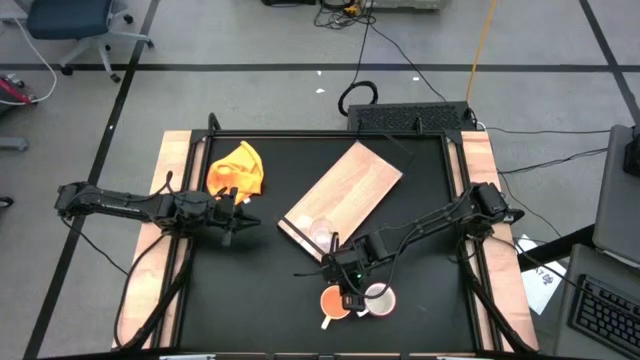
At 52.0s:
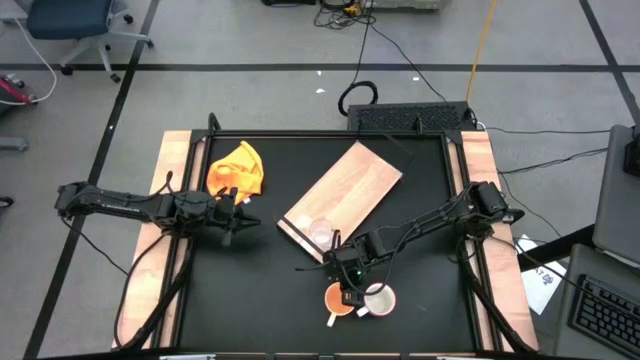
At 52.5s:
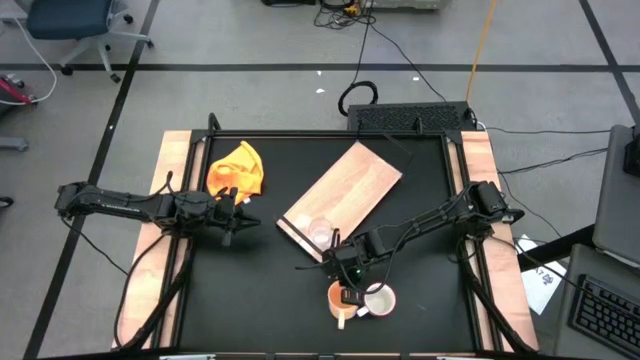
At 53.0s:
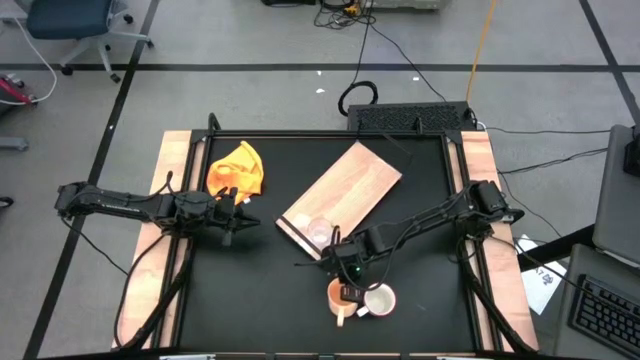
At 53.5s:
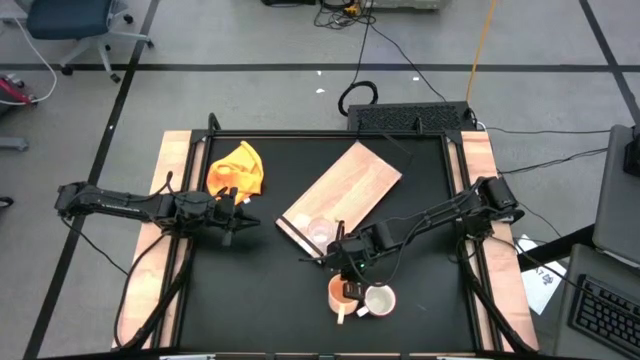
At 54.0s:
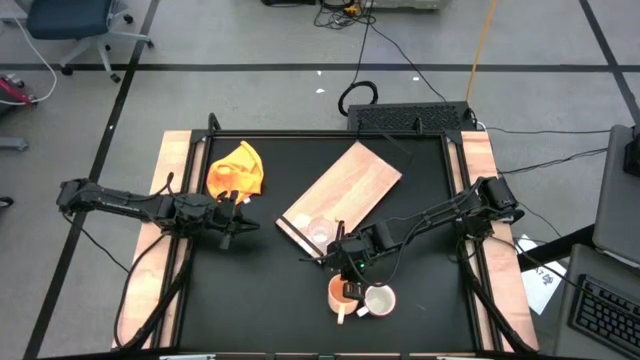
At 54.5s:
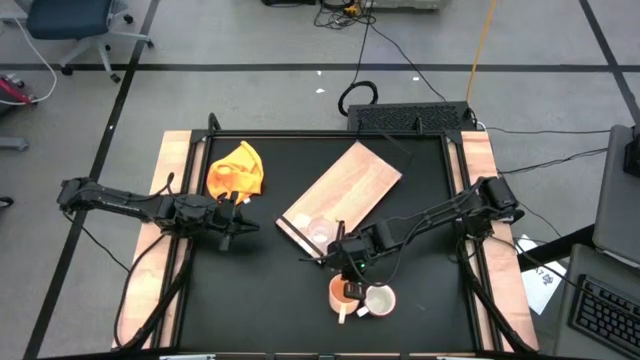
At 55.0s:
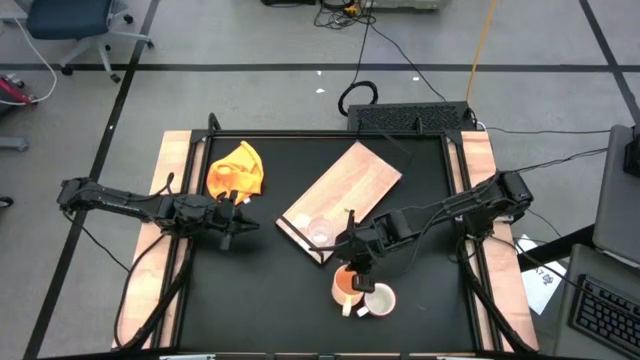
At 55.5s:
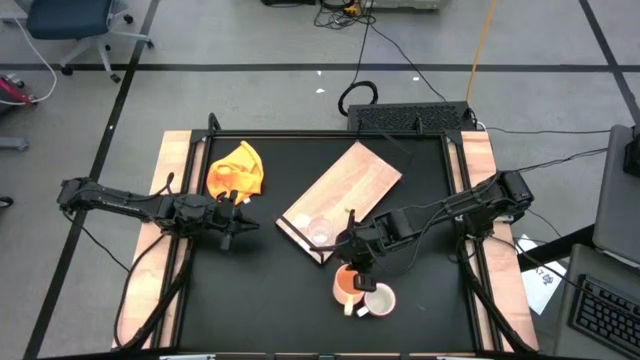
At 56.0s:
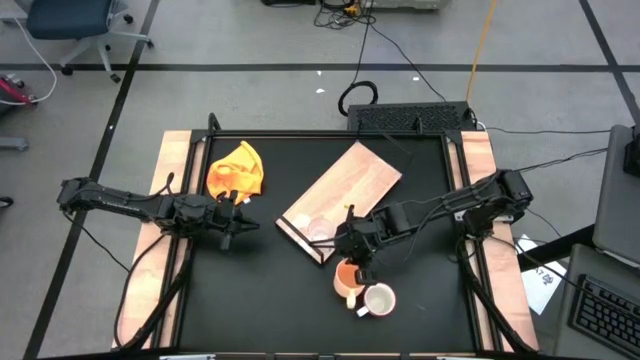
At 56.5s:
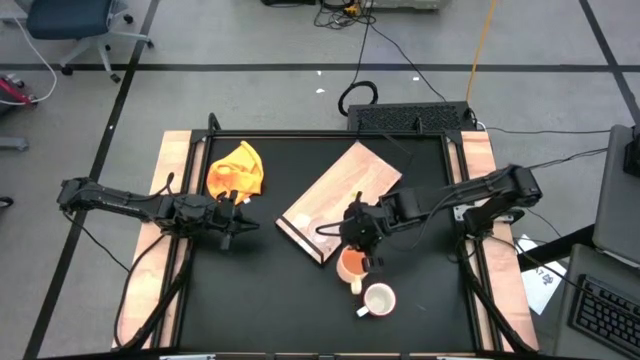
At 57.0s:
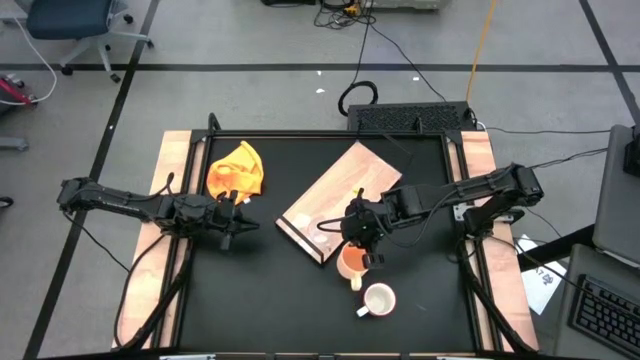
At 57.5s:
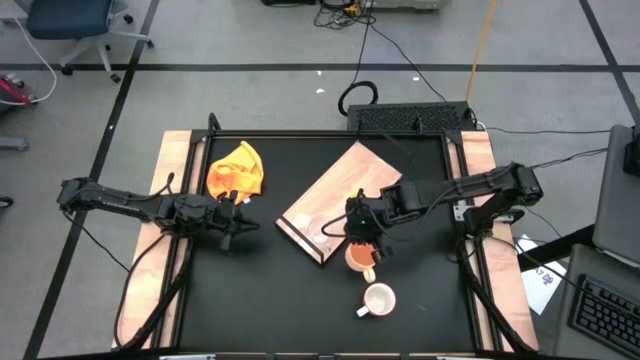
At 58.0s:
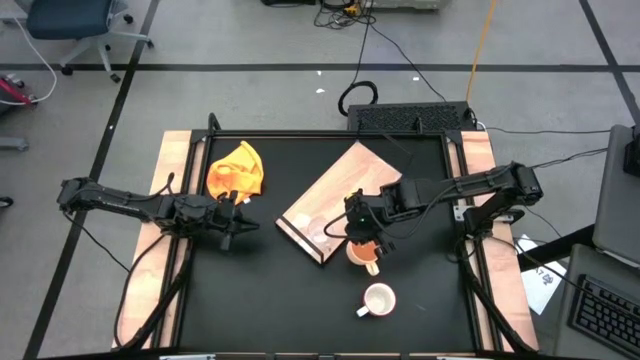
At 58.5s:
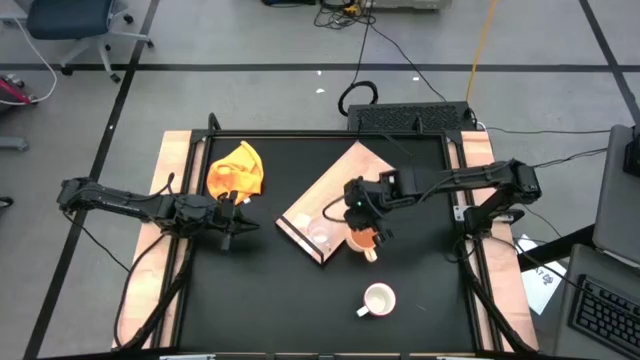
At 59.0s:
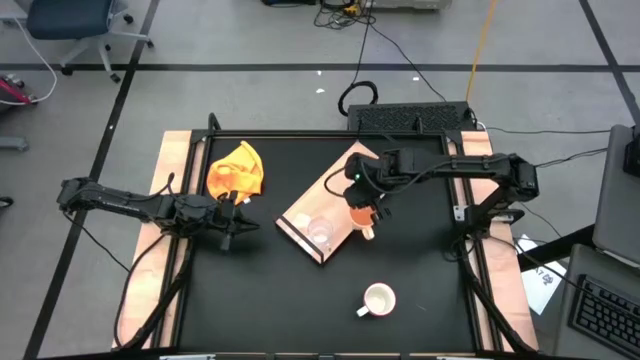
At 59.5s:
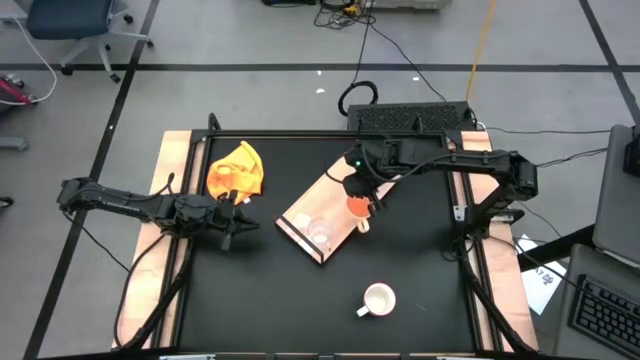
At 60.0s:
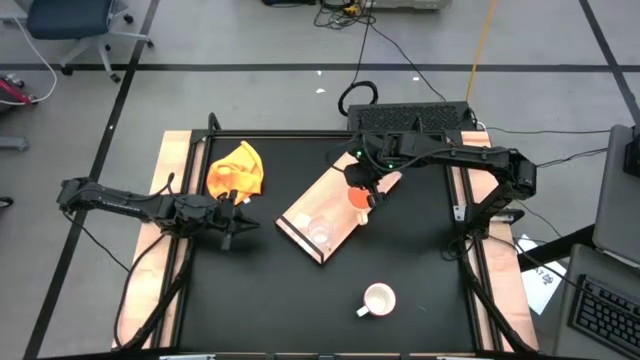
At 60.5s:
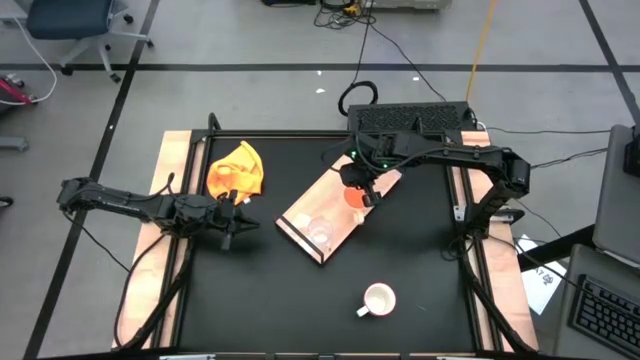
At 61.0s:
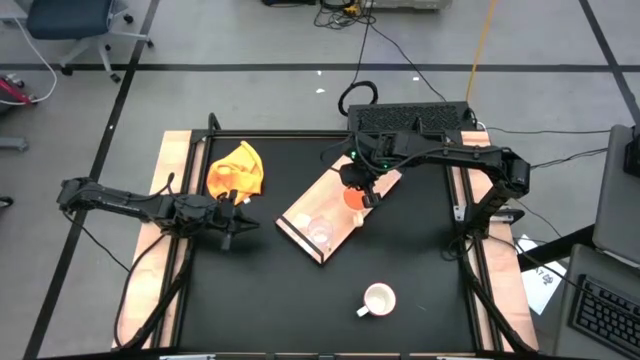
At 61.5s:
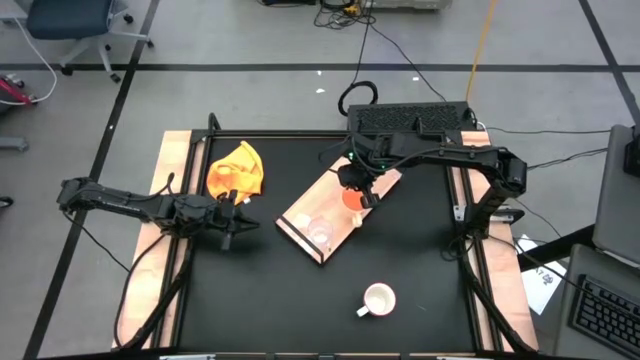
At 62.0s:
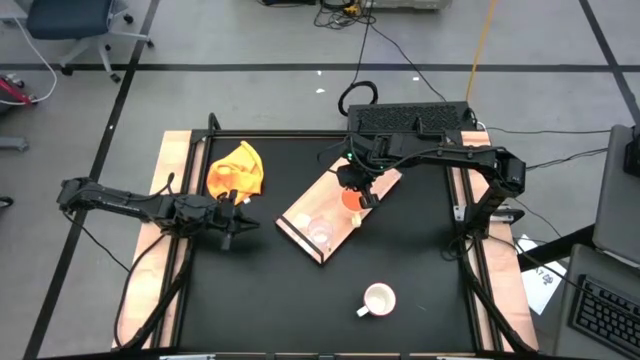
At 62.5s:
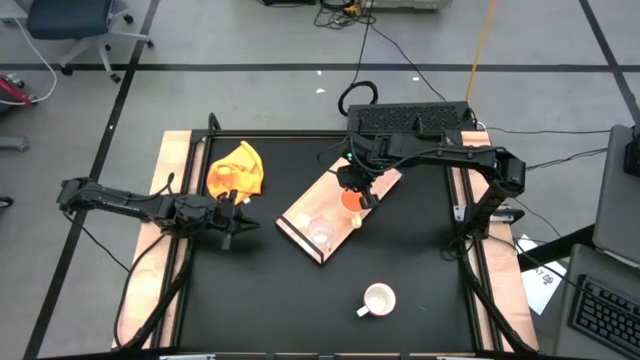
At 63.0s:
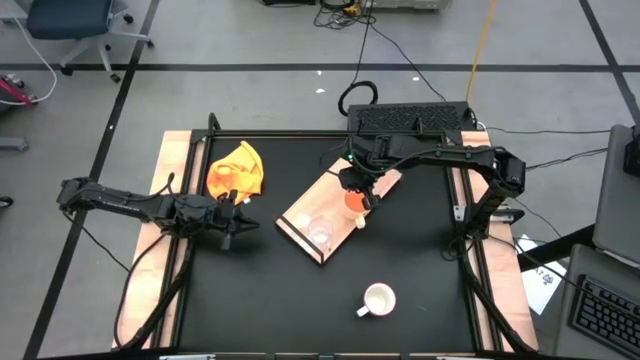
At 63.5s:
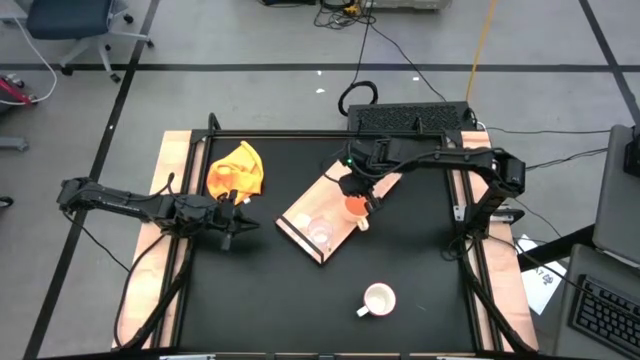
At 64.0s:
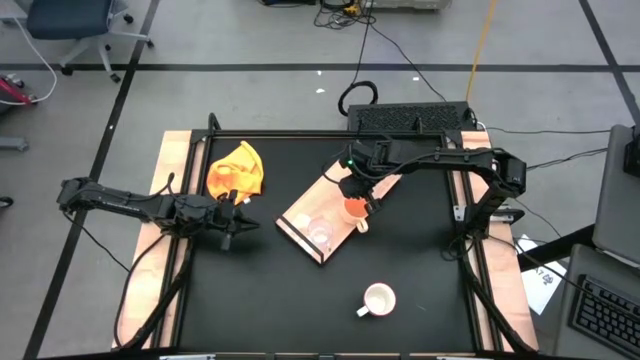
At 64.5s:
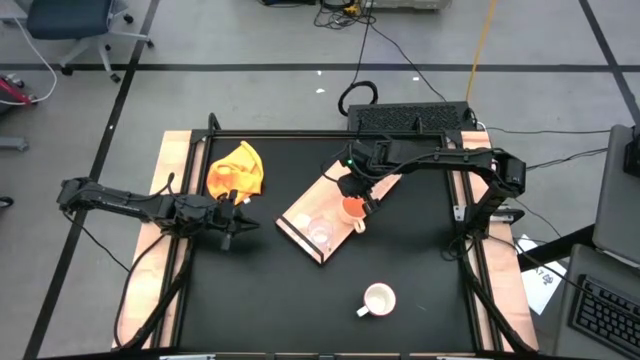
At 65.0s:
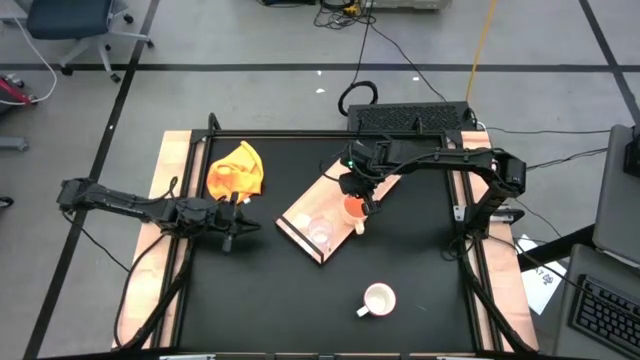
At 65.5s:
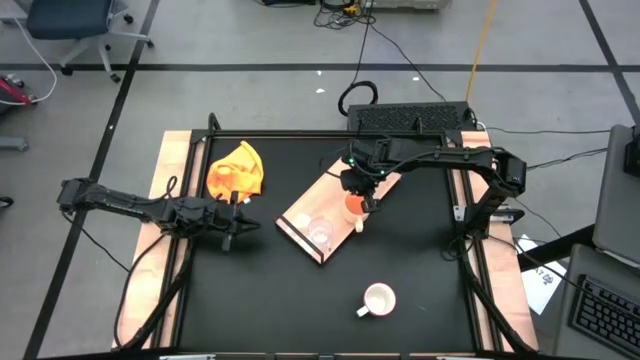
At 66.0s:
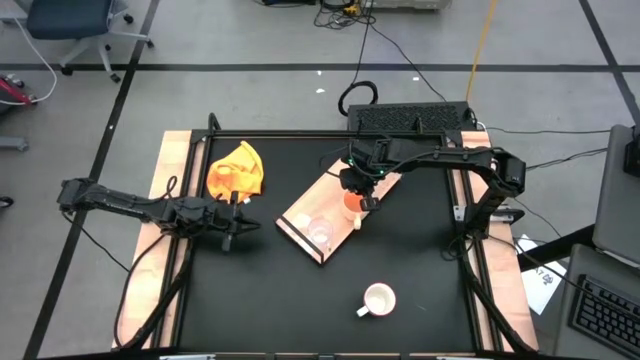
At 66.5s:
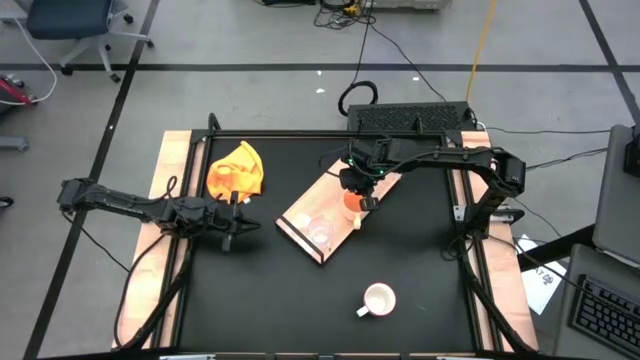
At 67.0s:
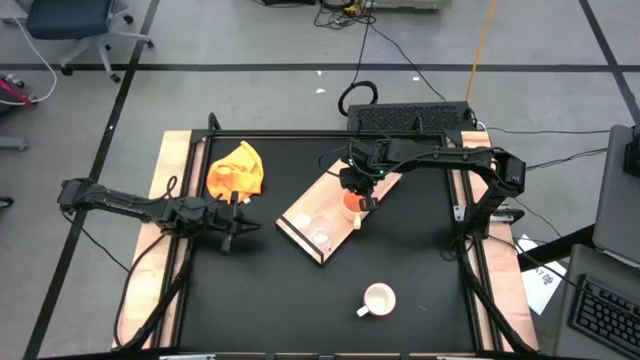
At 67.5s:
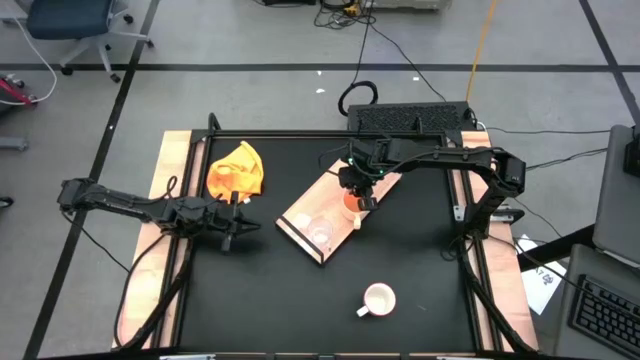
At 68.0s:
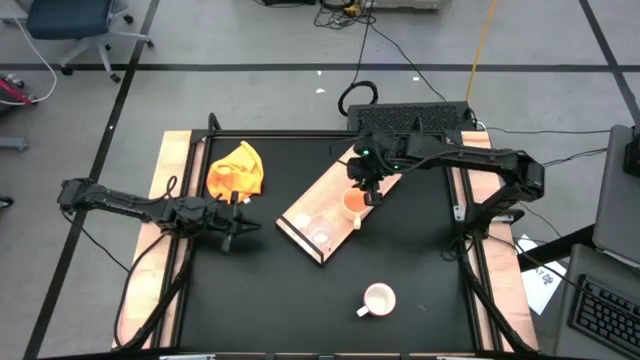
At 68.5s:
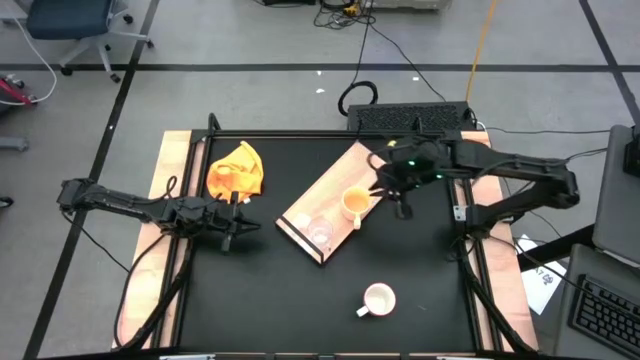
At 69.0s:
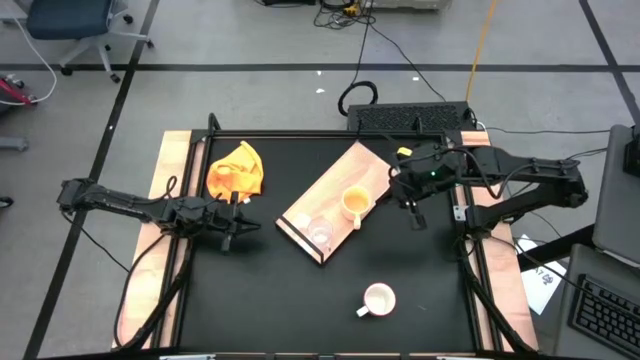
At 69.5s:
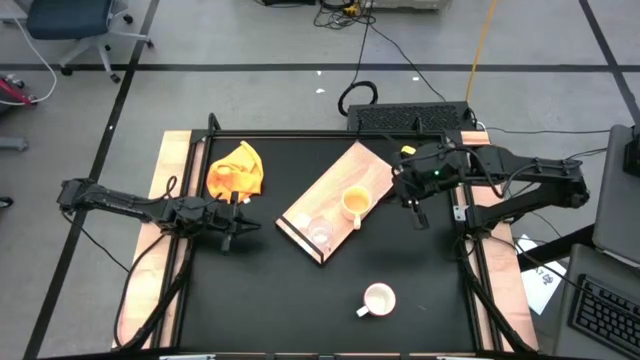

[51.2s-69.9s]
Task: Stack small to large cups/mugs on shelf
Put the orange mug on the shelf

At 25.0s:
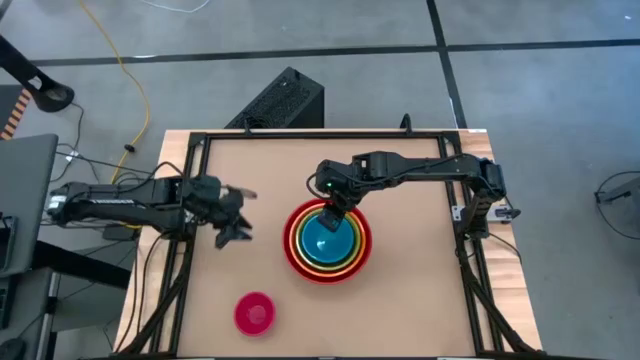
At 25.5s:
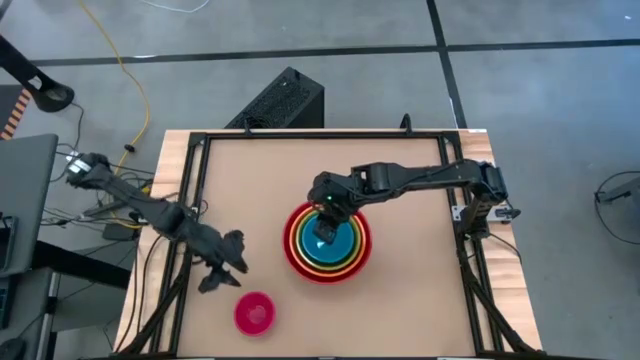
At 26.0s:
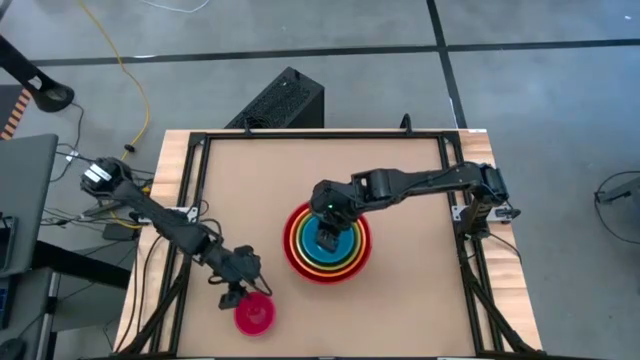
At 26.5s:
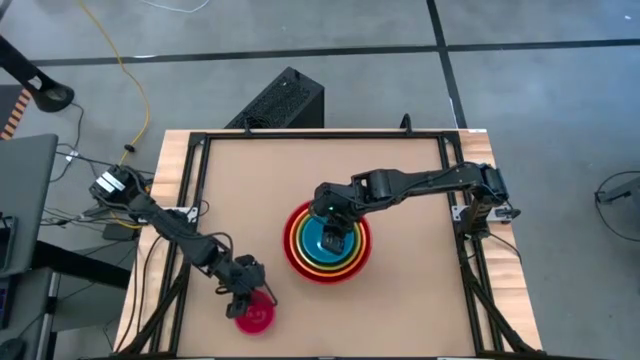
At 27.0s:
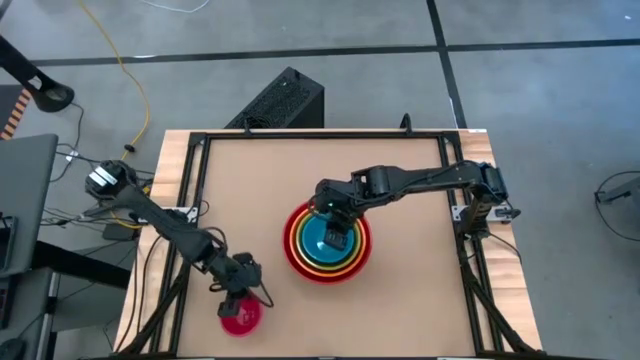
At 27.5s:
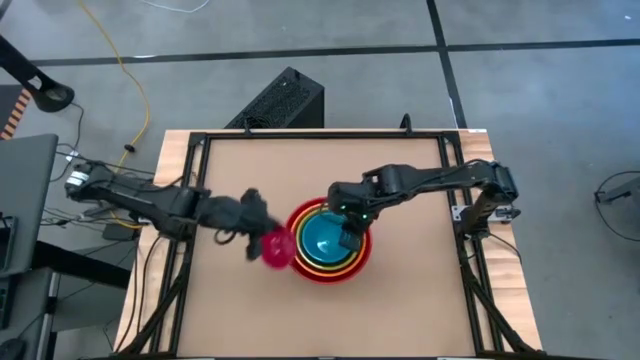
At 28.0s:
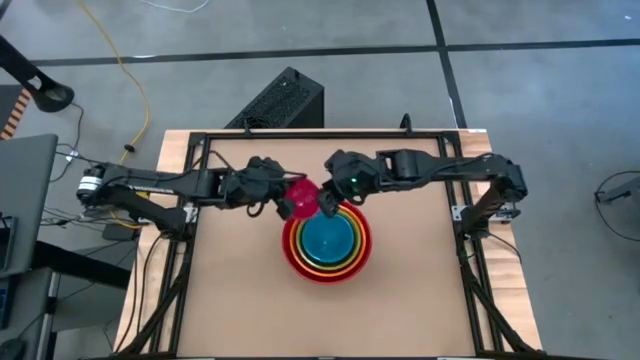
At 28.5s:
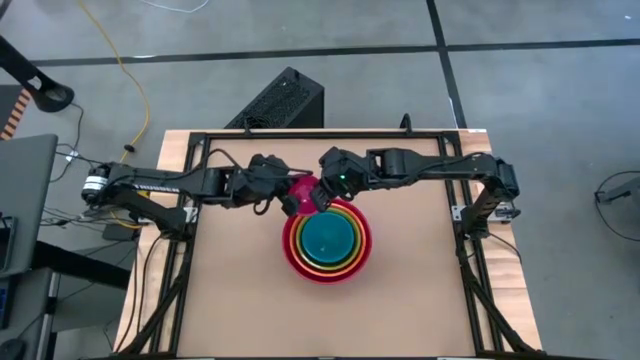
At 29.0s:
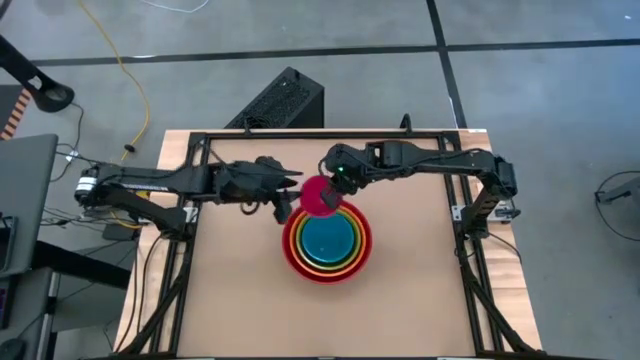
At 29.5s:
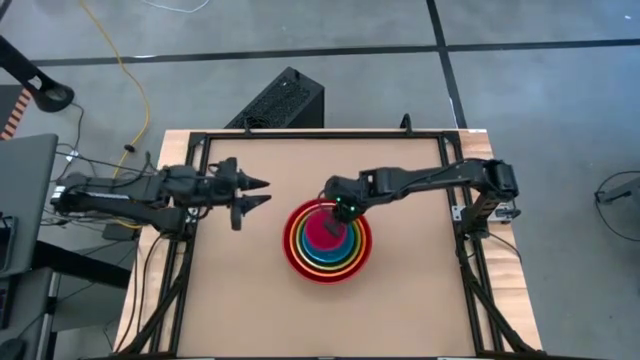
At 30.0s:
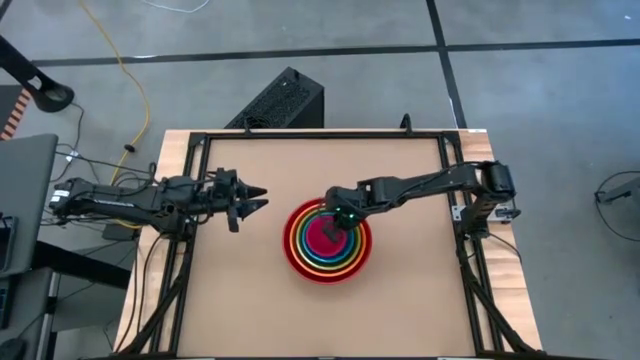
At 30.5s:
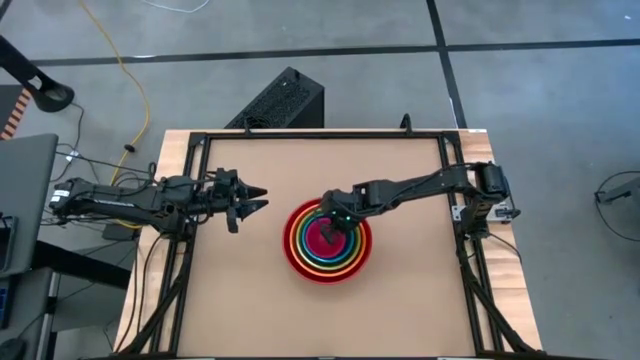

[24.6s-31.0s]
Task: Nest bowls inside each other by size order
Stack the pink bowl on top of the blue bowl
